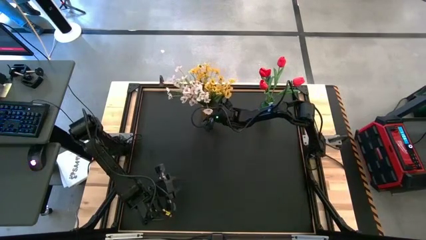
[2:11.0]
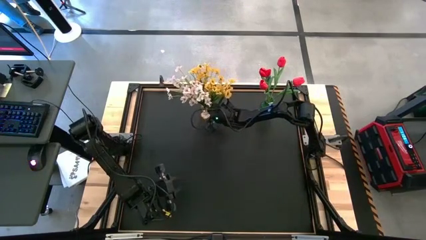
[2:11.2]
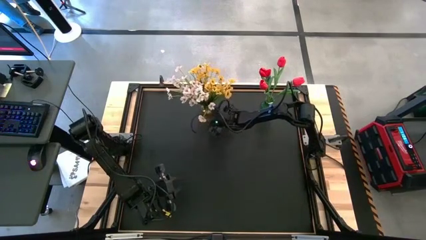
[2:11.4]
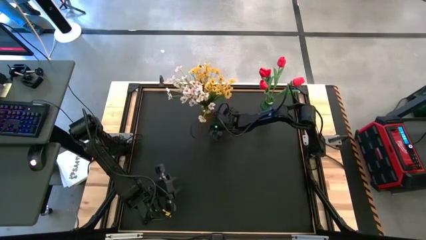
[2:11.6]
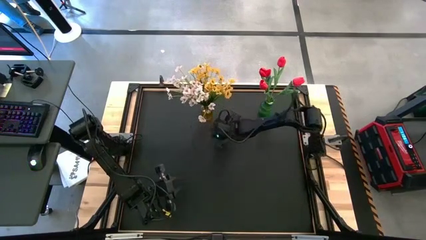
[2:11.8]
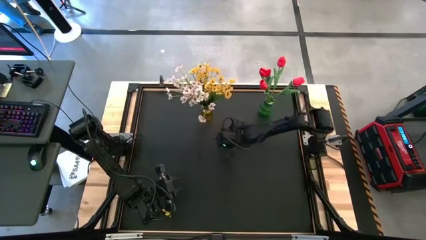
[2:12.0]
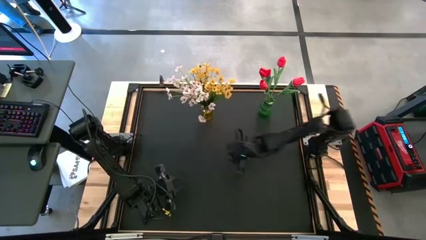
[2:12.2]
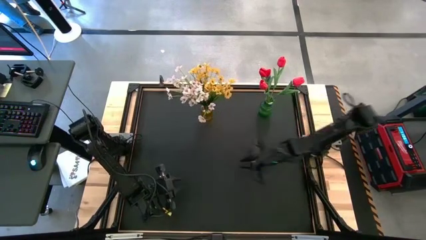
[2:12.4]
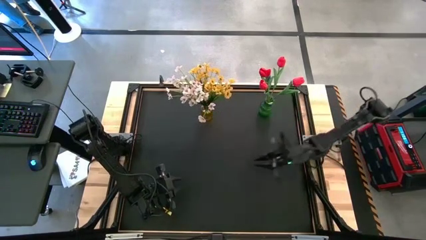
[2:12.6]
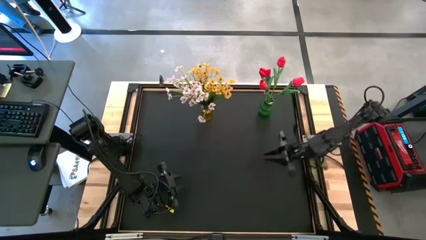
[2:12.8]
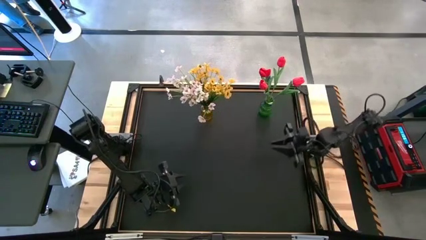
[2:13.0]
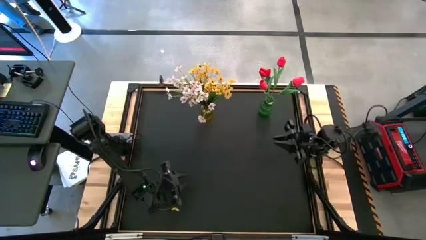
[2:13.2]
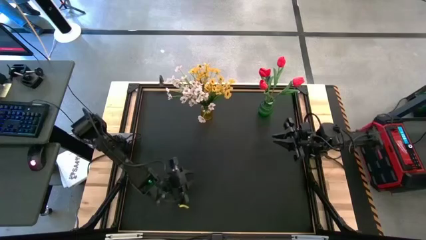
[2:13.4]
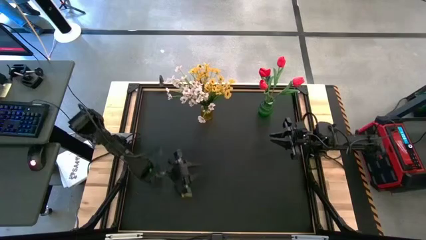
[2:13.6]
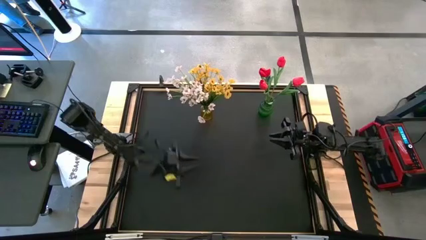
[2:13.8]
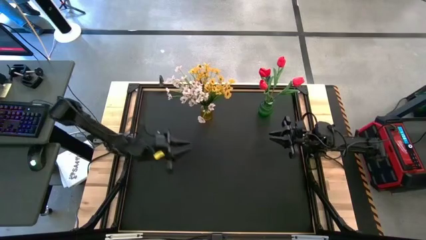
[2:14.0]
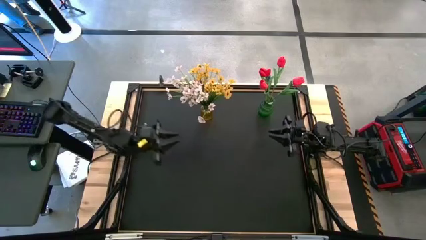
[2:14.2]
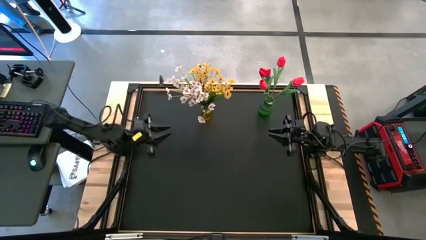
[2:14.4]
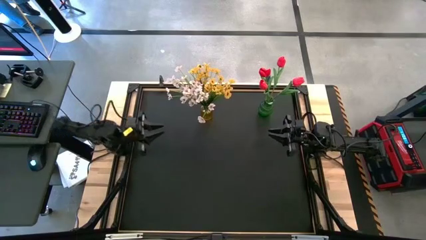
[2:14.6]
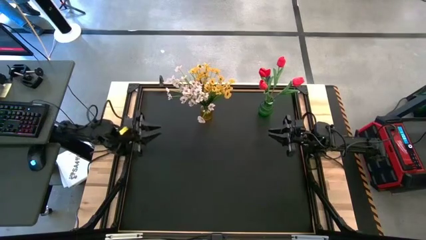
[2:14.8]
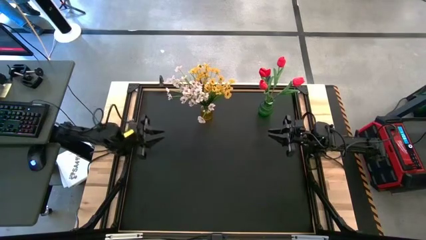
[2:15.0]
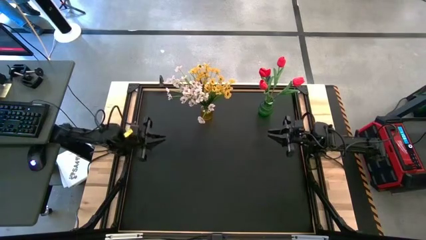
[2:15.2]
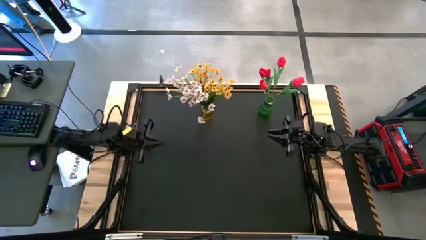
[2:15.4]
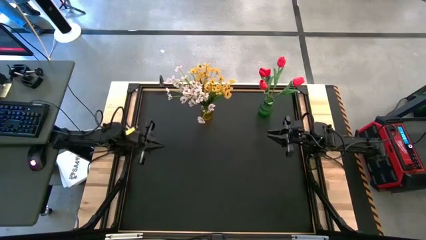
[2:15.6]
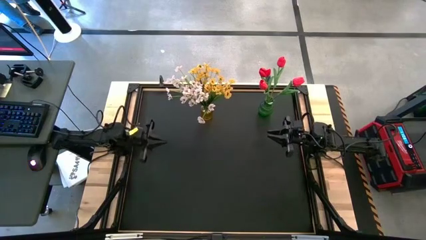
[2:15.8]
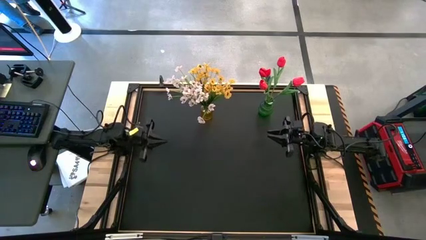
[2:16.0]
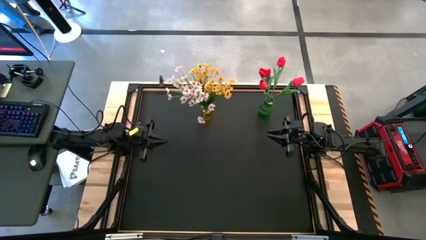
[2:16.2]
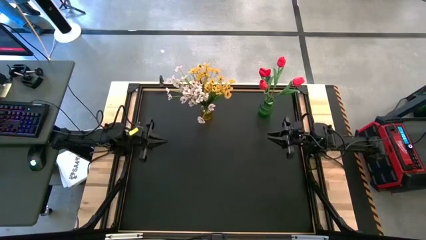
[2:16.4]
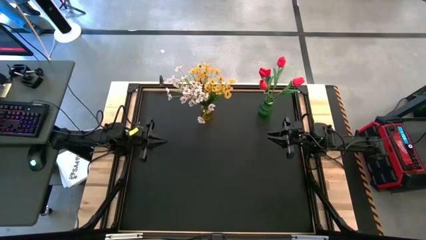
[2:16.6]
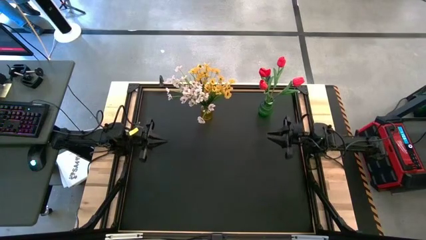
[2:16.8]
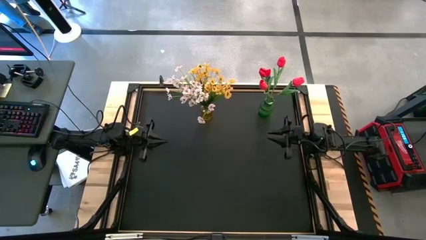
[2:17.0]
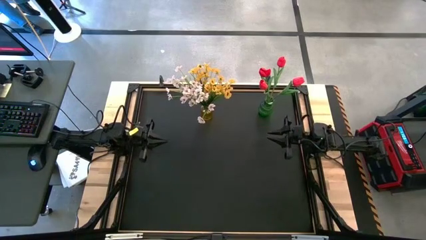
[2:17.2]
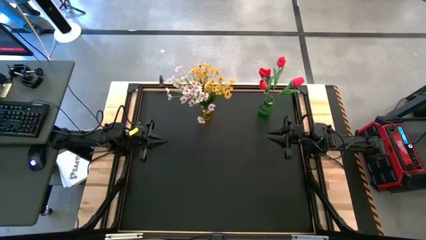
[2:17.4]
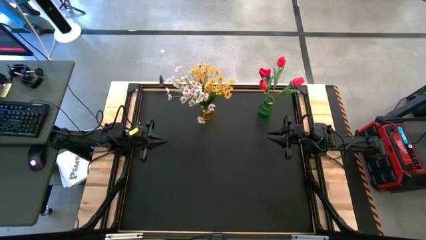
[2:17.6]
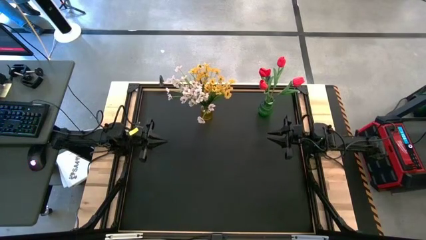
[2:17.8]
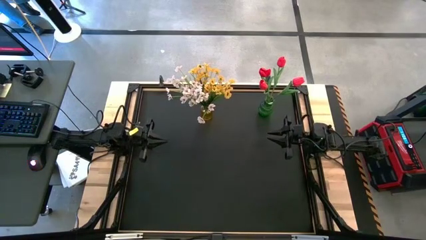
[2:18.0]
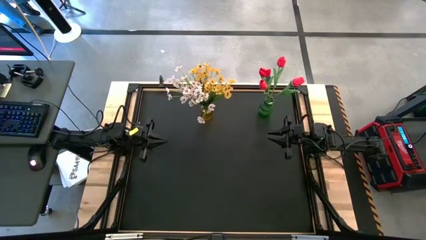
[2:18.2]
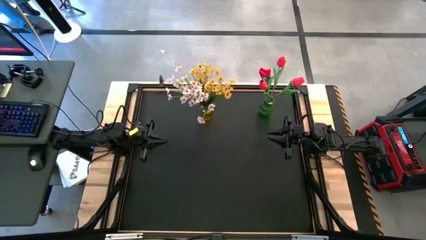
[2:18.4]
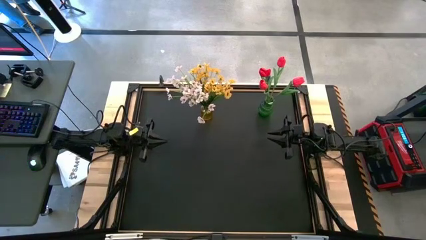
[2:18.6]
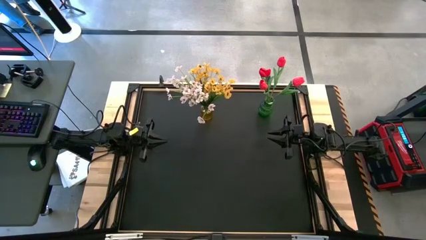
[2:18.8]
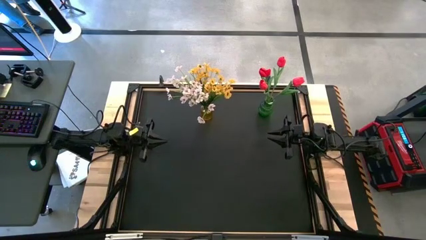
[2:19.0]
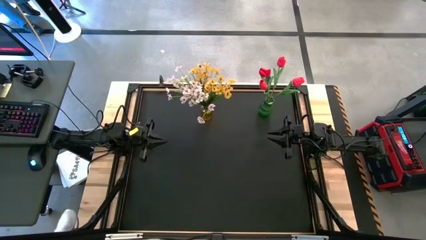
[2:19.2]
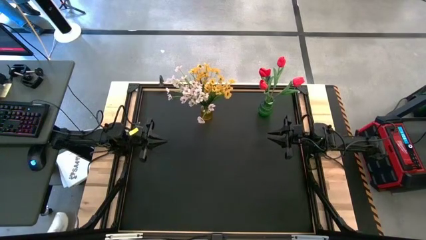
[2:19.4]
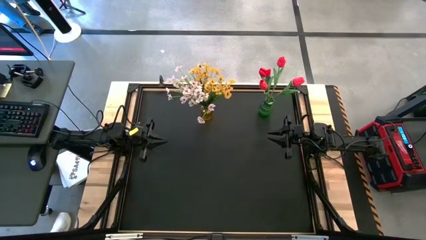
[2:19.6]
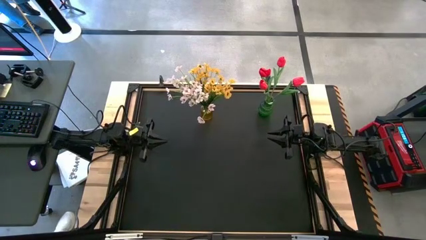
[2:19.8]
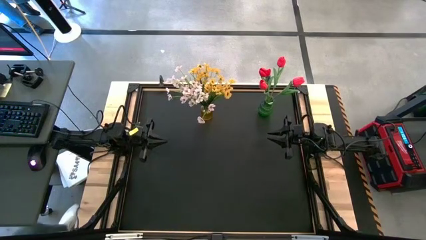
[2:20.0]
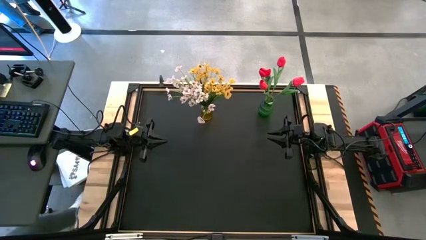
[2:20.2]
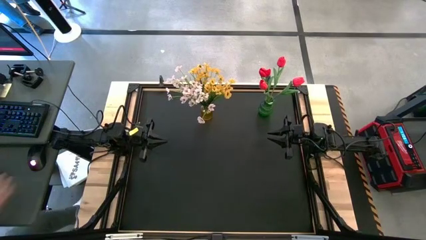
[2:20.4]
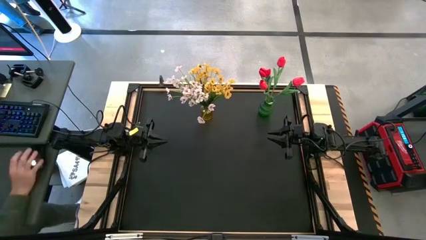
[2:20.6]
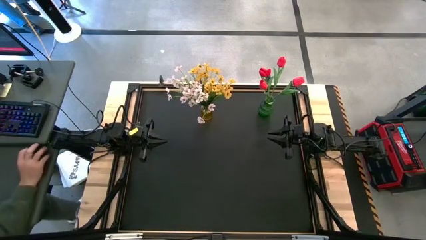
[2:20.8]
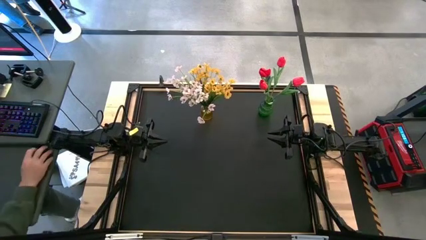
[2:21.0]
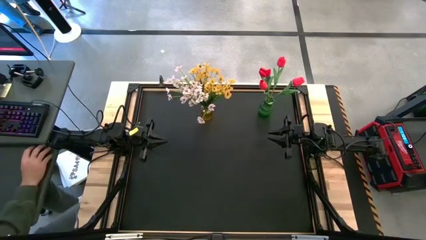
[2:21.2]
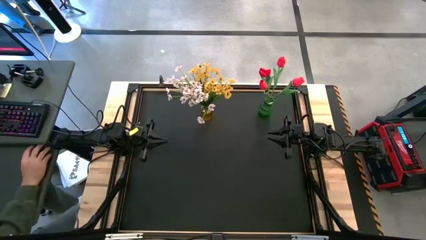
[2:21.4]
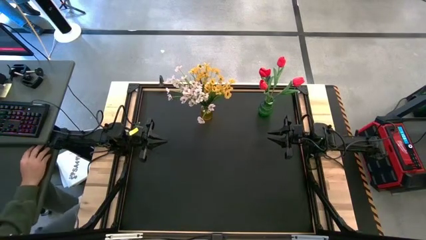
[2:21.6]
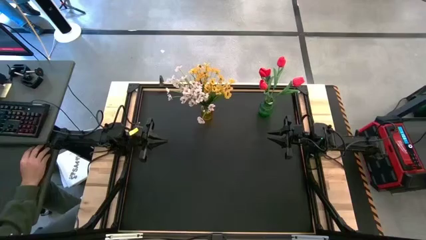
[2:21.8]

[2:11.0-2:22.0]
Task: Sort flowers into vase by color
Return to Home Position

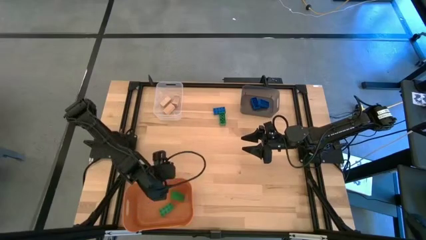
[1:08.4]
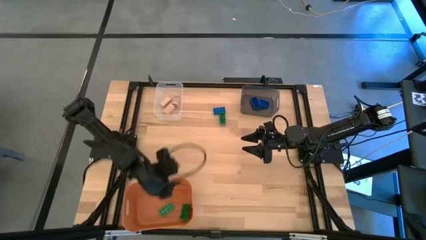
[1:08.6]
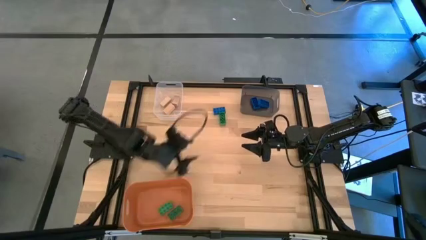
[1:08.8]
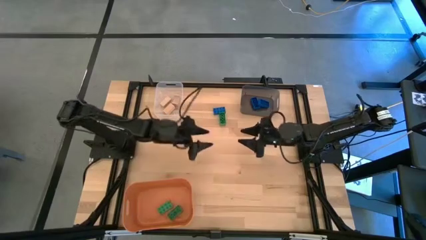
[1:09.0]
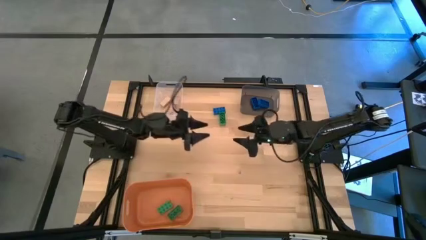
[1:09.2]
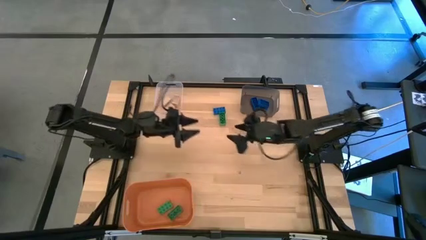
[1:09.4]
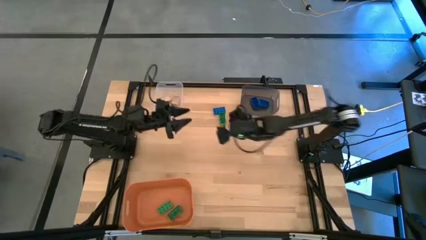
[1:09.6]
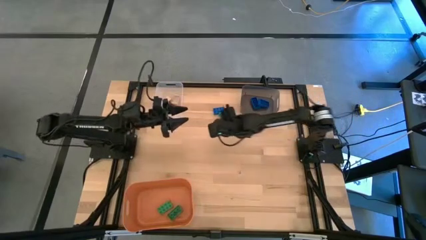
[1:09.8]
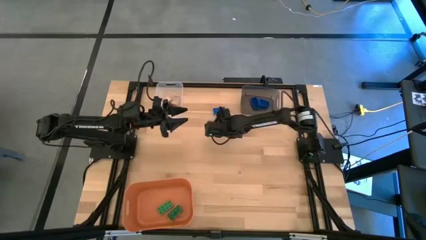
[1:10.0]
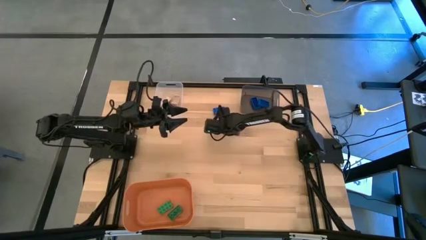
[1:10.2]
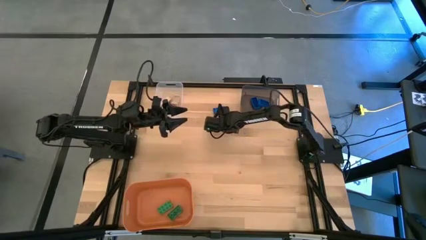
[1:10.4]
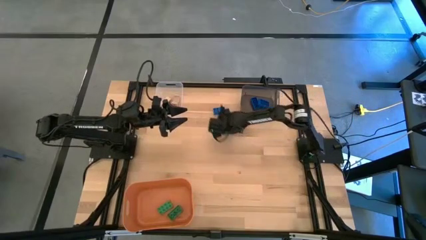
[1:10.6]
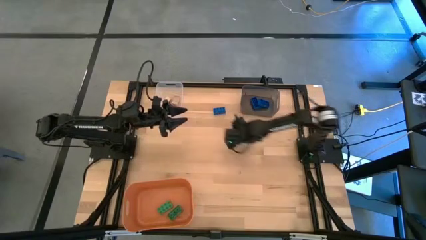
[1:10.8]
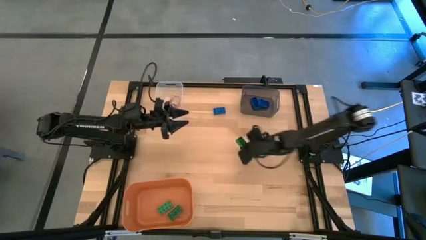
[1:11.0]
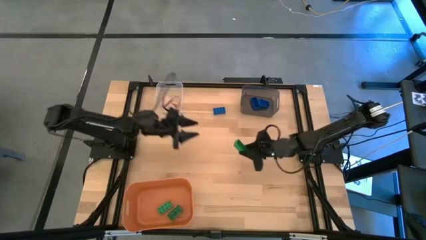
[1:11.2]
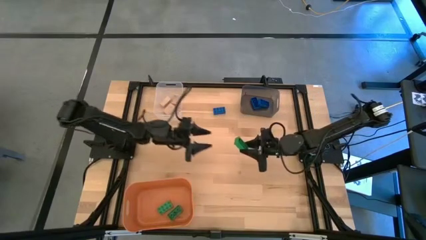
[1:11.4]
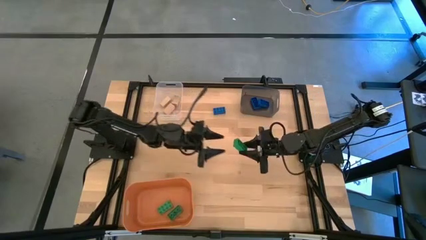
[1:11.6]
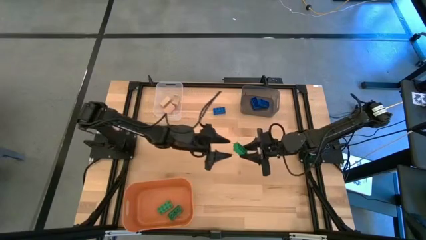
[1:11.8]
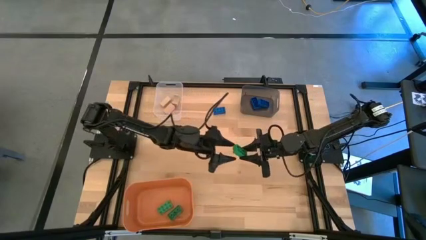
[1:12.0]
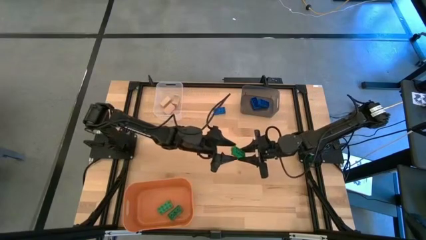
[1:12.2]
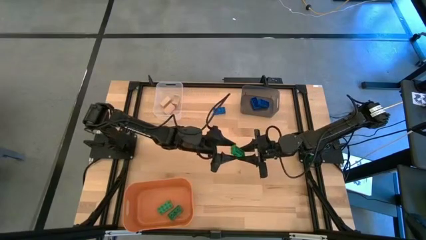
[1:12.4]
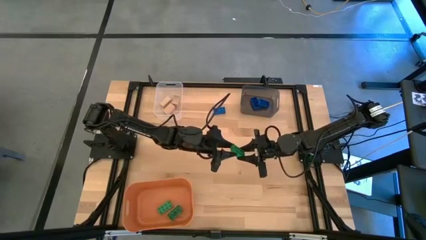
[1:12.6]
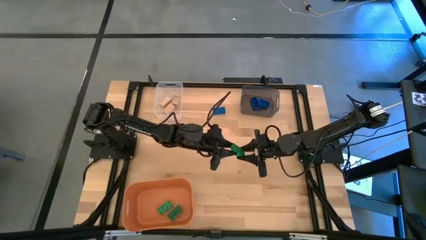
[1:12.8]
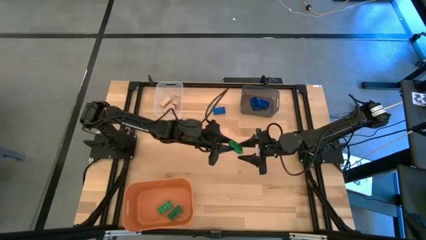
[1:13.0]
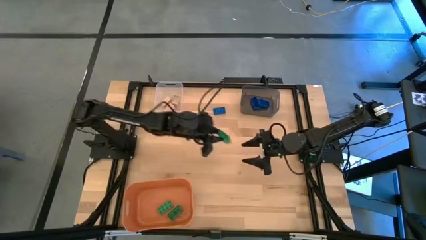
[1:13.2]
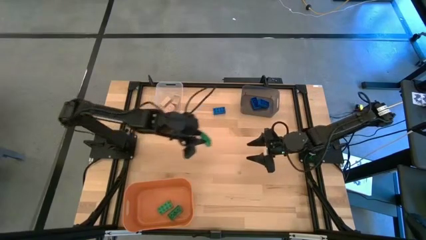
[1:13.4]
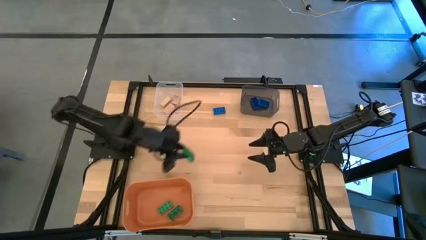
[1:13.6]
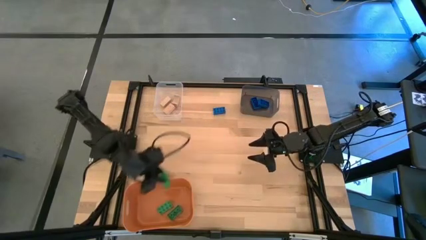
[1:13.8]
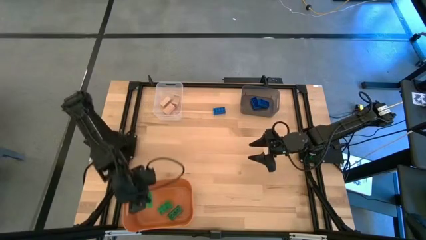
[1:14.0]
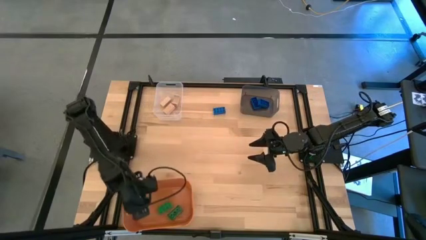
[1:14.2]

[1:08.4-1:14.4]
Task: Sort & place blocks by color
Put the green game piece into the orange bin
